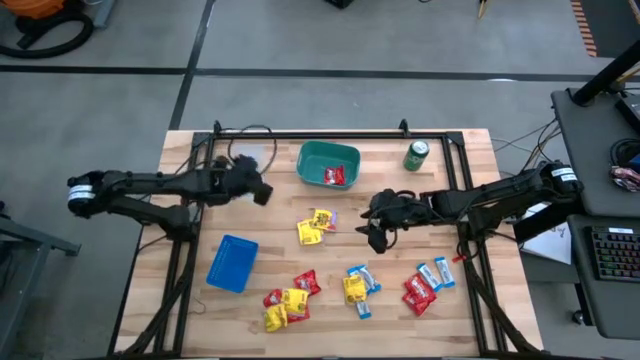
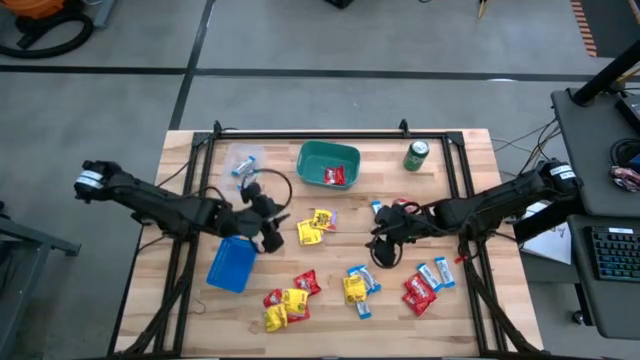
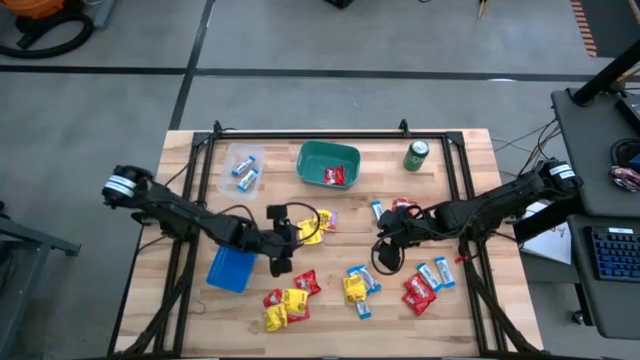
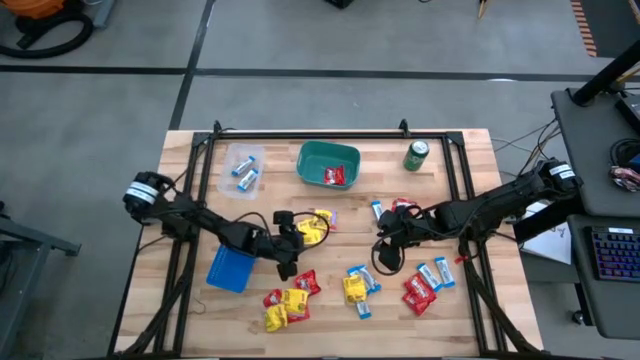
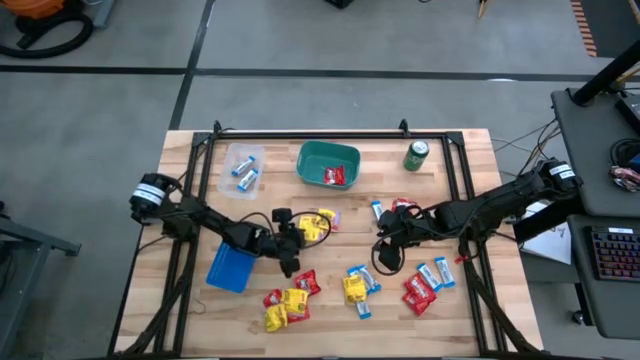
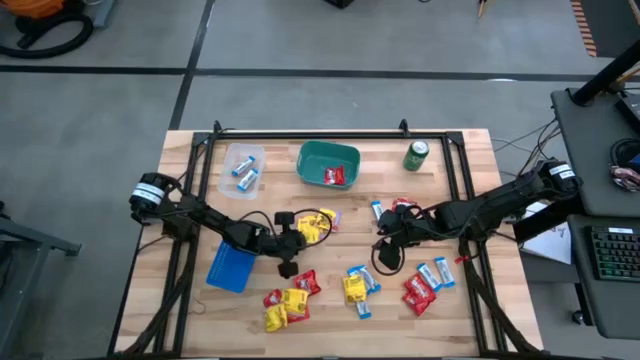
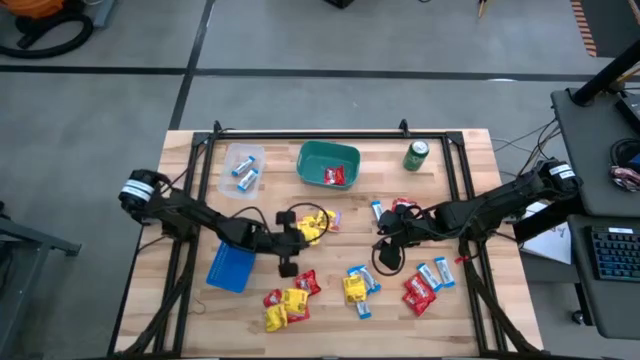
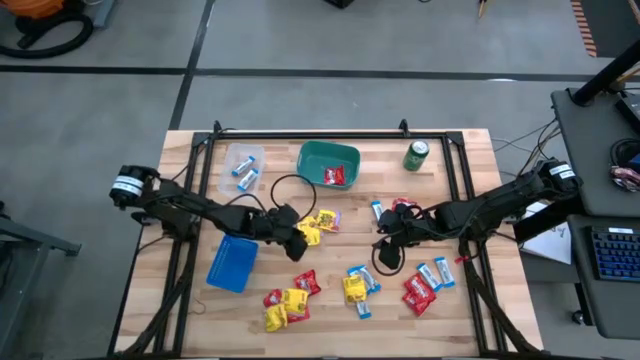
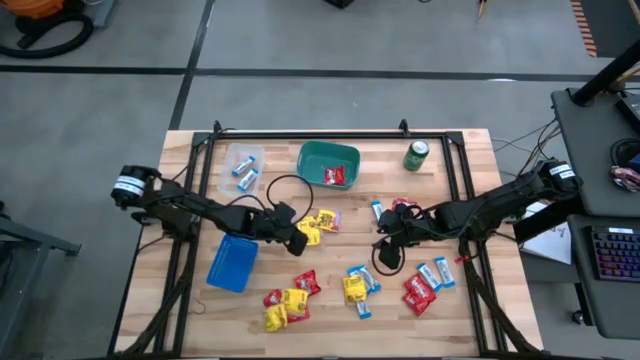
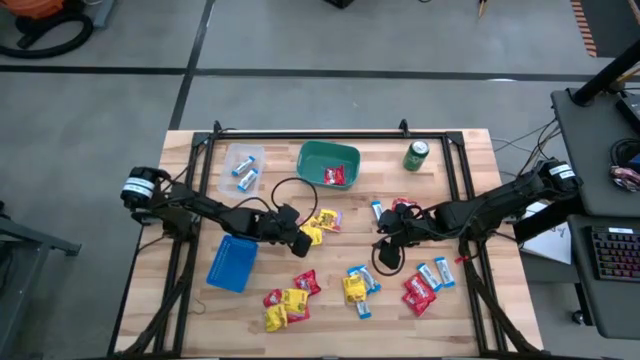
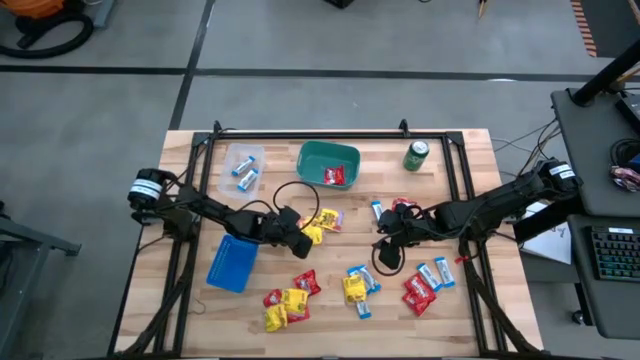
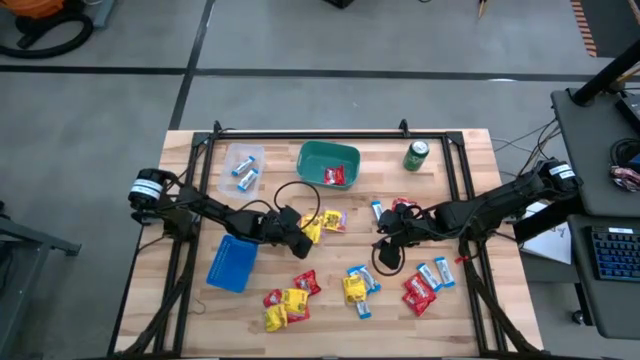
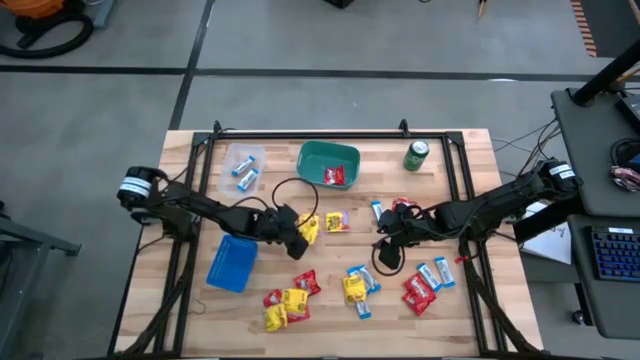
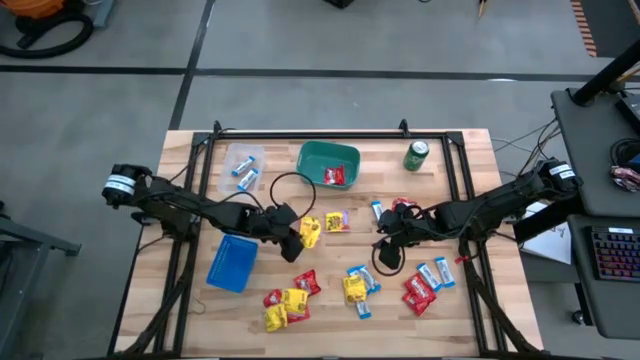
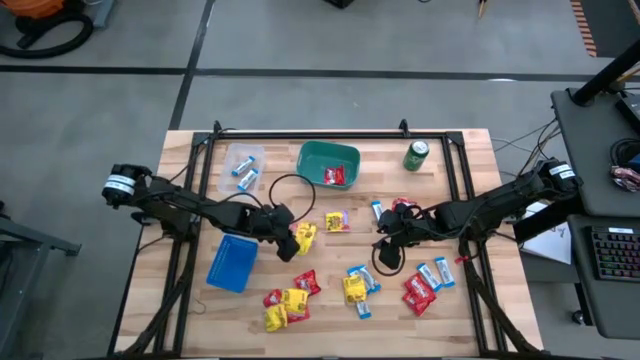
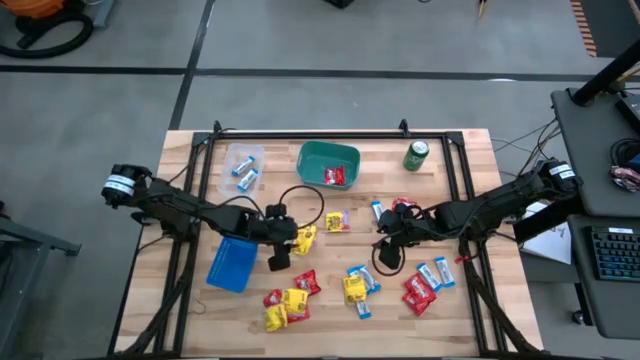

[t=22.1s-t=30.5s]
Task: Sort candy
Put the yellow candy into the blue basket

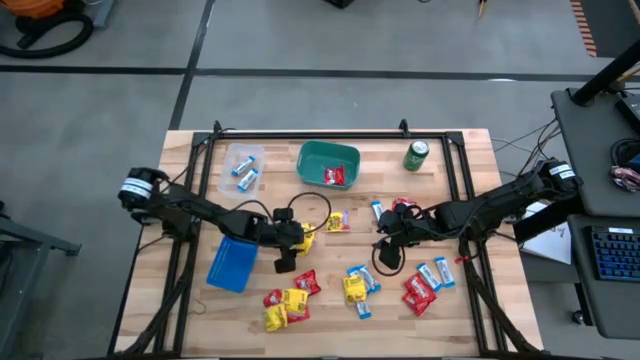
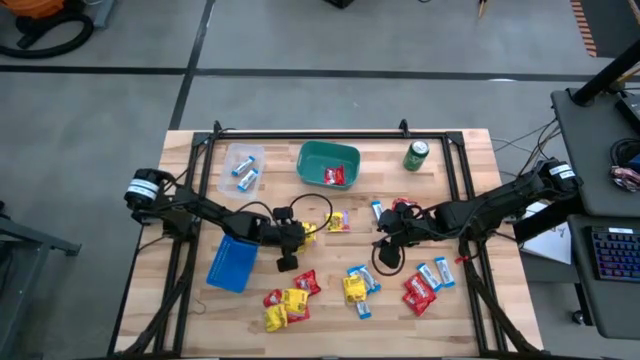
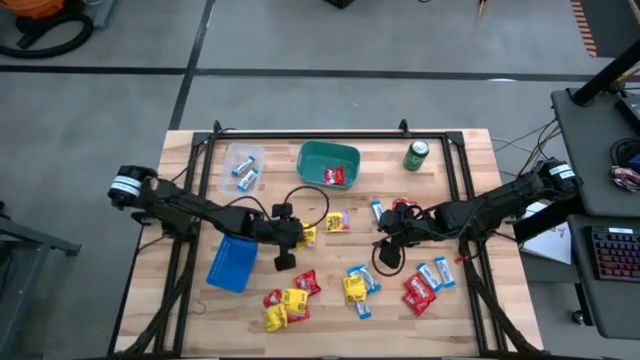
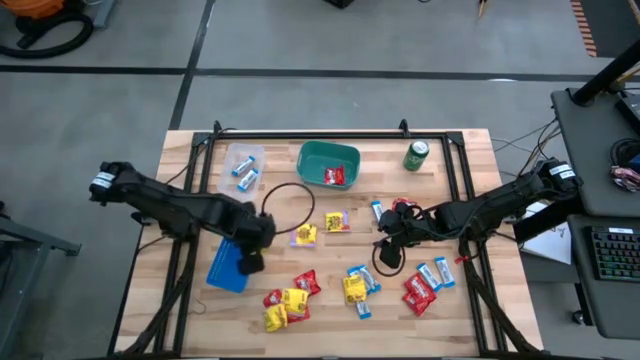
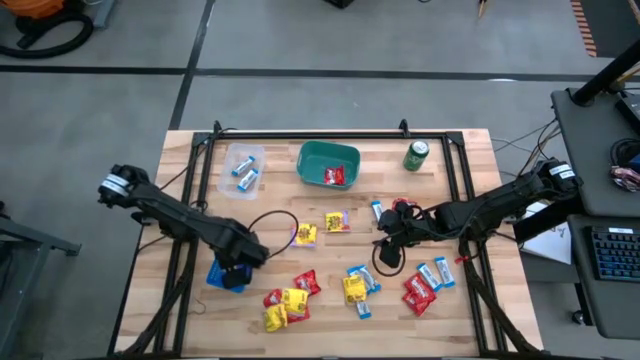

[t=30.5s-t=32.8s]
Put the yellow candy into the blue basket

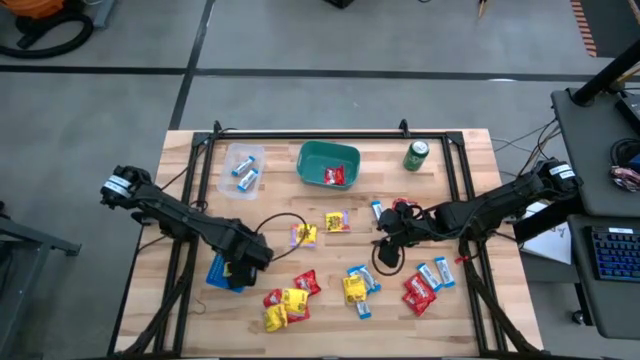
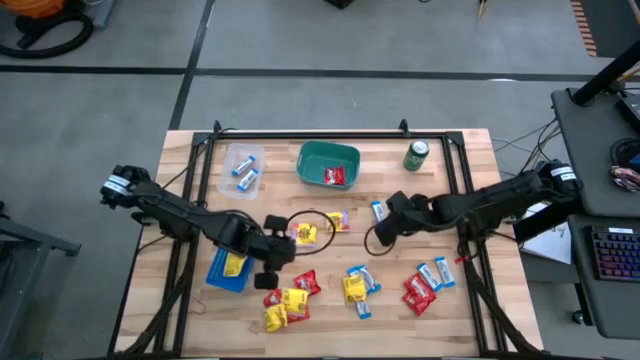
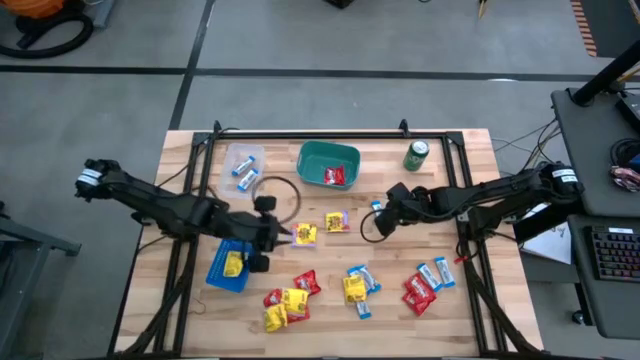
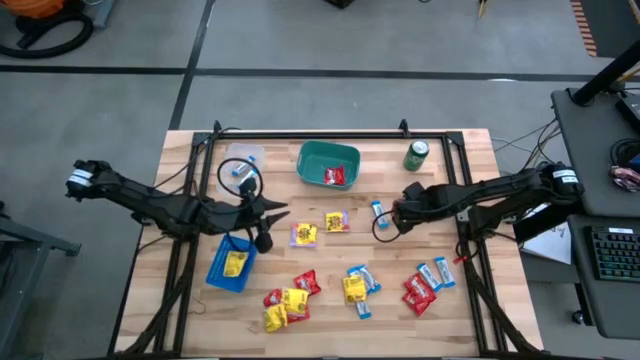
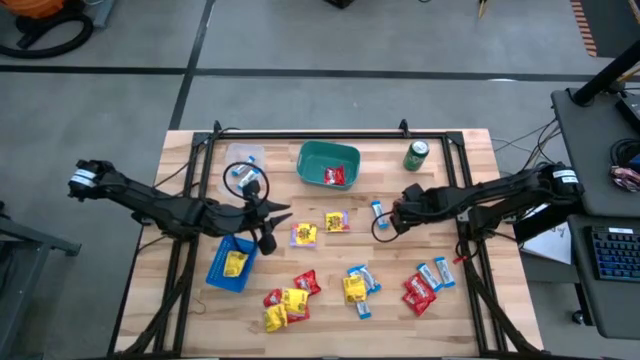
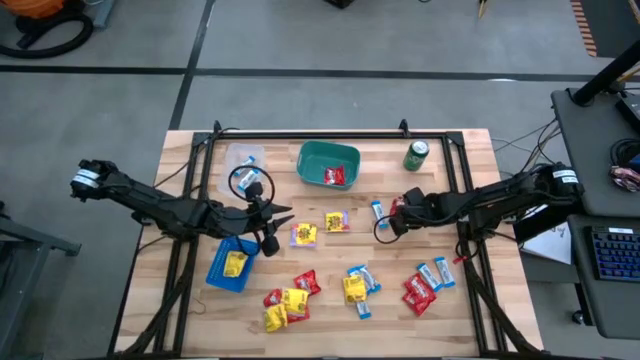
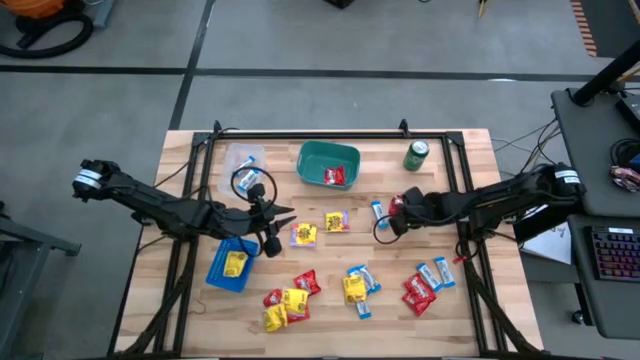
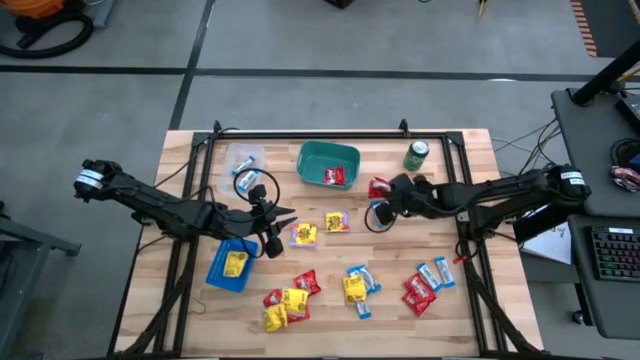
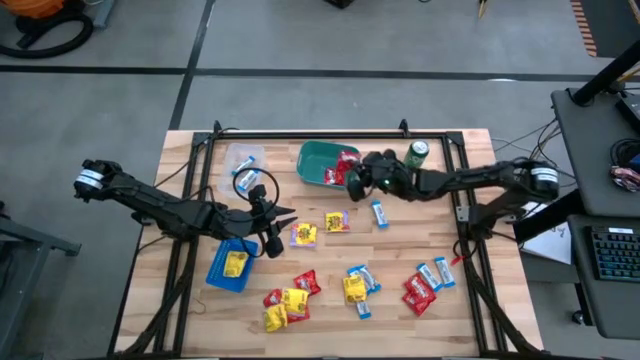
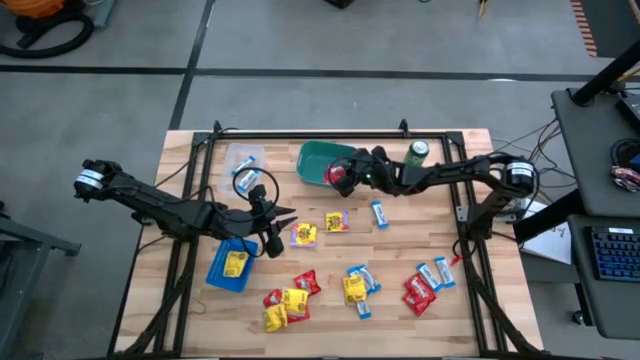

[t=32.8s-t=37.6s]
Put the red candy into the green bin

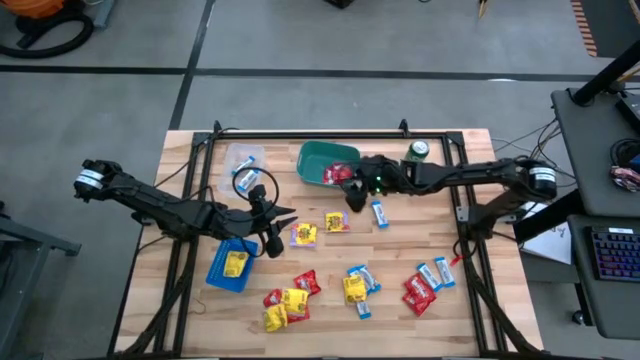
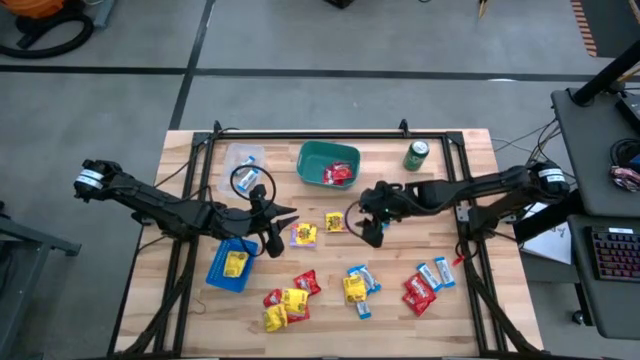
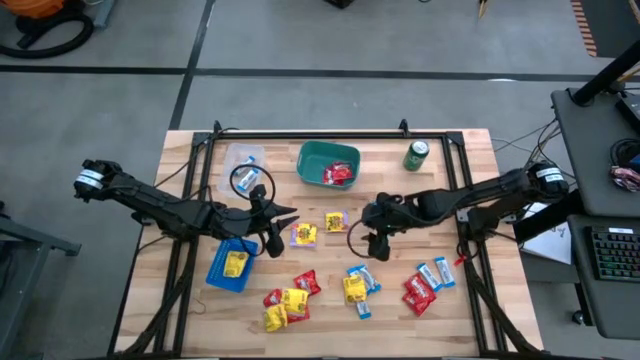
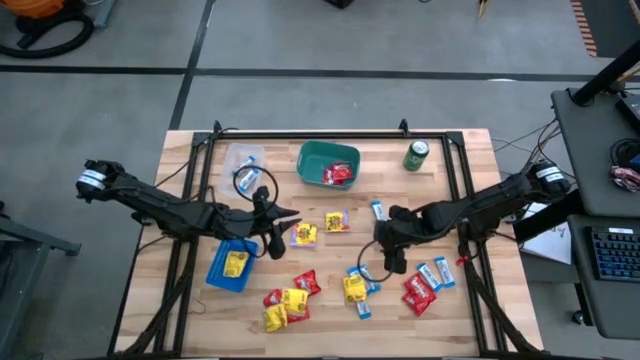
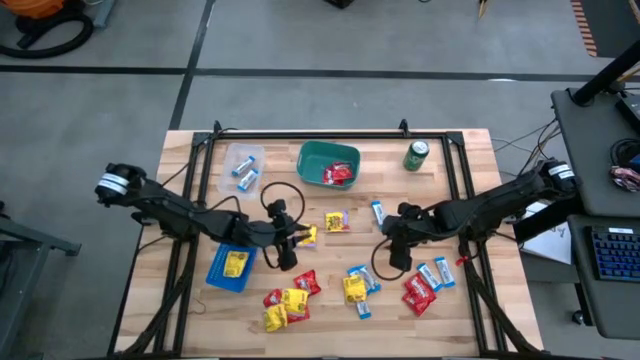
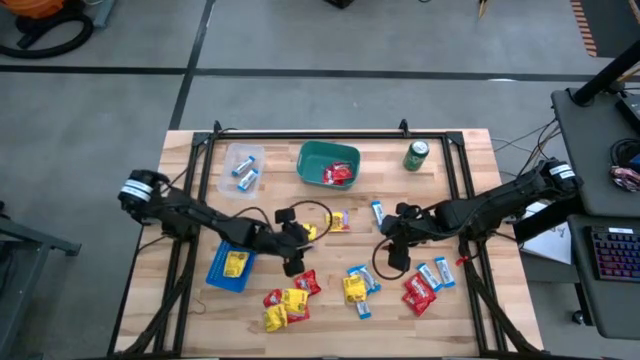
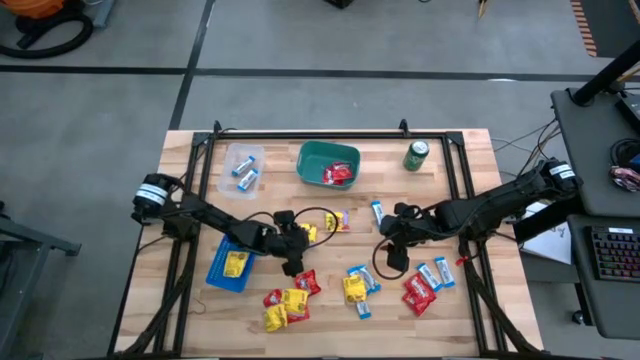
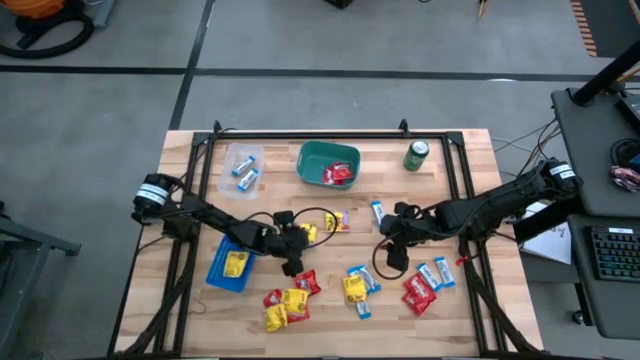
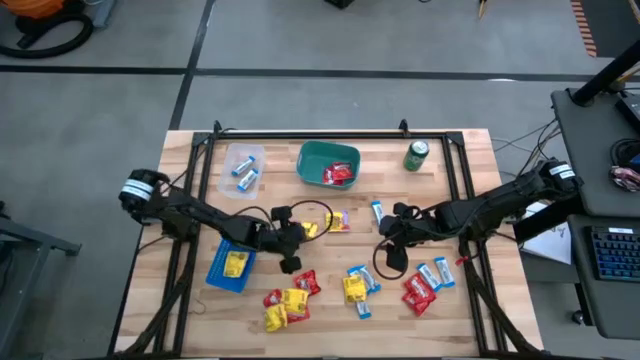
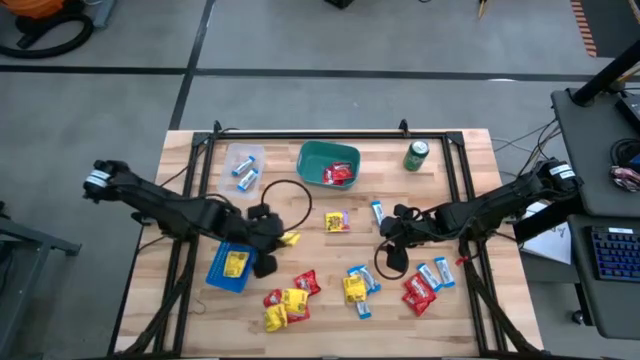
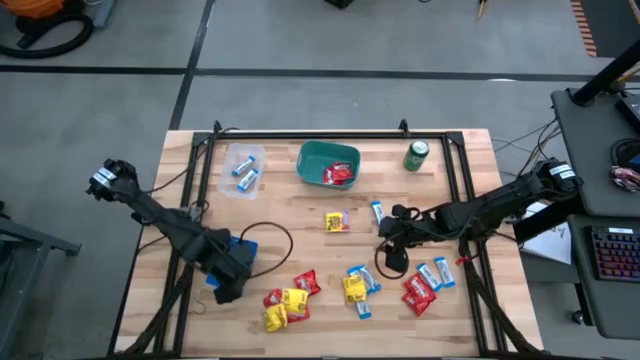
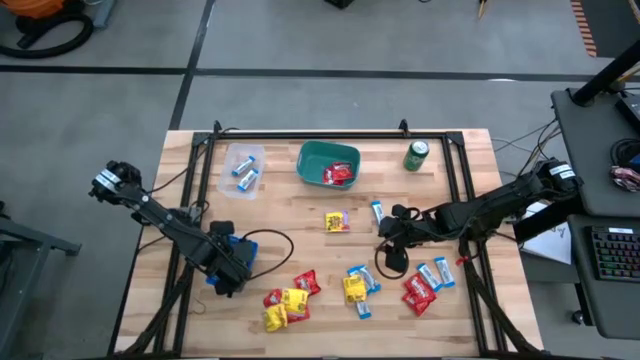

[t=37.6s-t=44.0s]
Put the yellow candy into the blue basket
